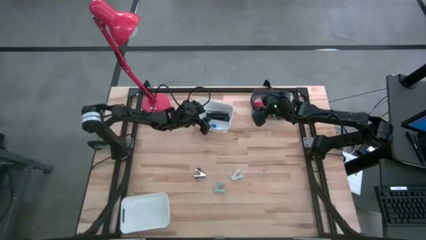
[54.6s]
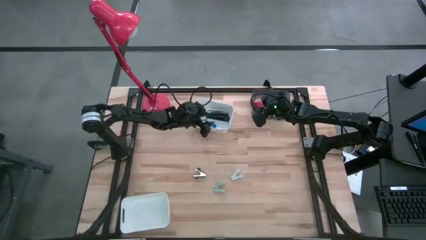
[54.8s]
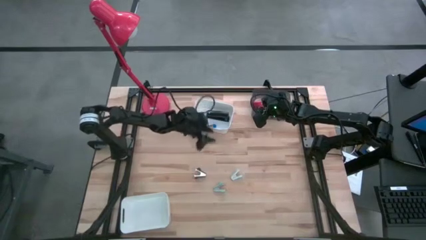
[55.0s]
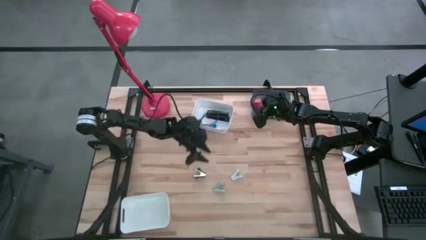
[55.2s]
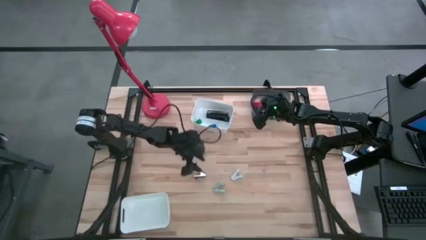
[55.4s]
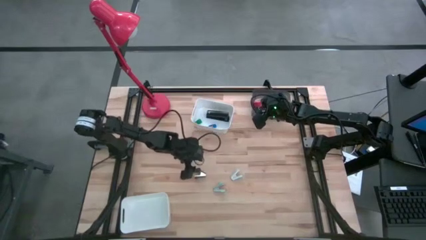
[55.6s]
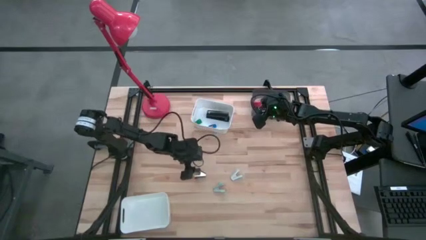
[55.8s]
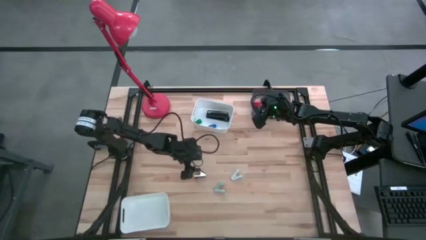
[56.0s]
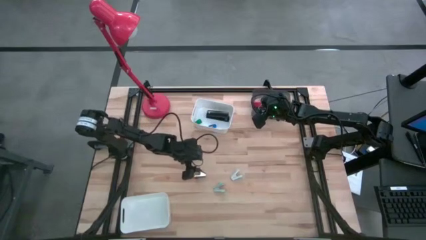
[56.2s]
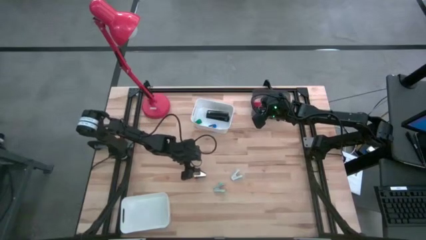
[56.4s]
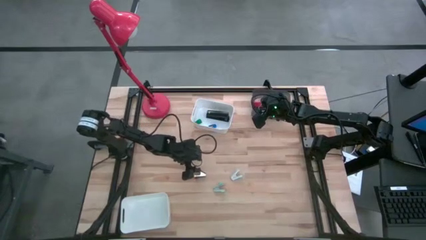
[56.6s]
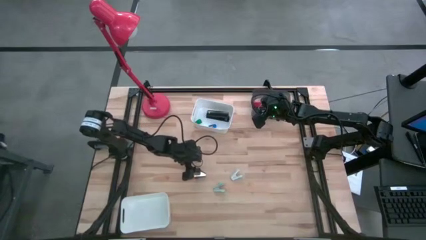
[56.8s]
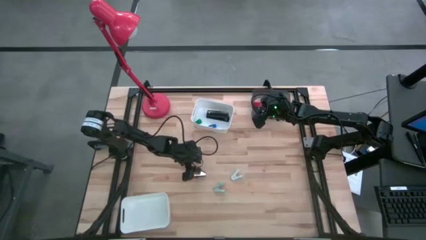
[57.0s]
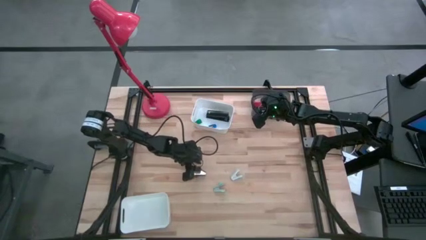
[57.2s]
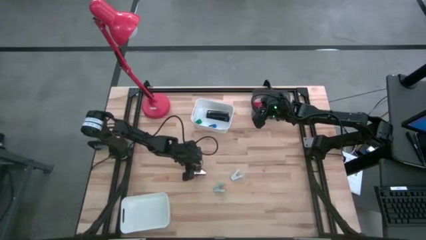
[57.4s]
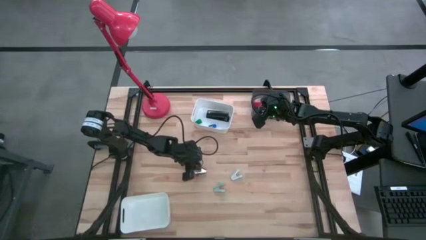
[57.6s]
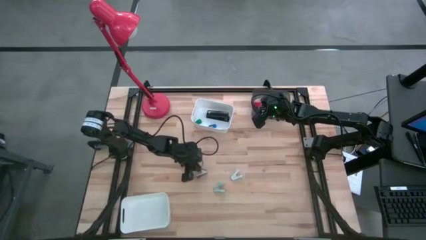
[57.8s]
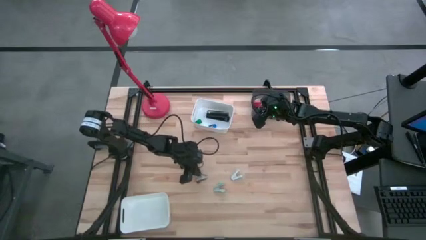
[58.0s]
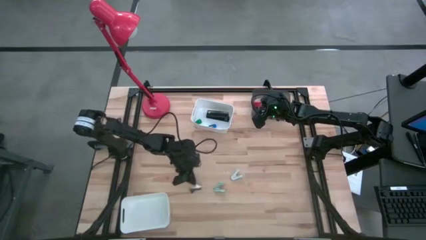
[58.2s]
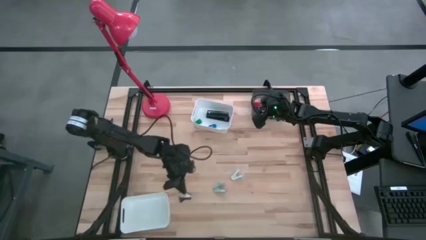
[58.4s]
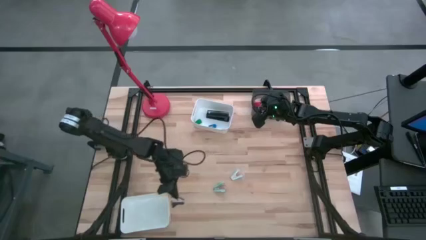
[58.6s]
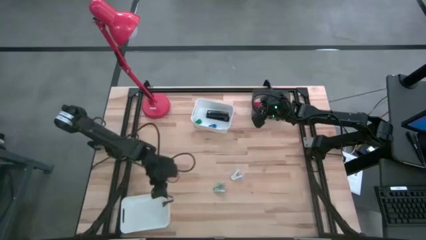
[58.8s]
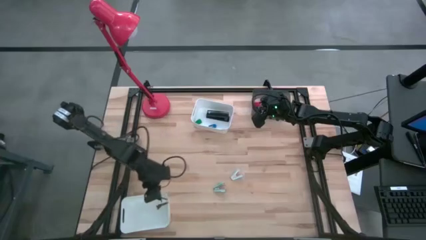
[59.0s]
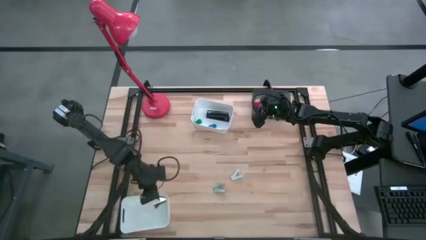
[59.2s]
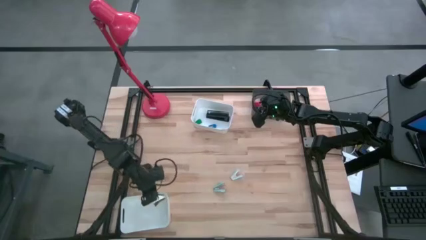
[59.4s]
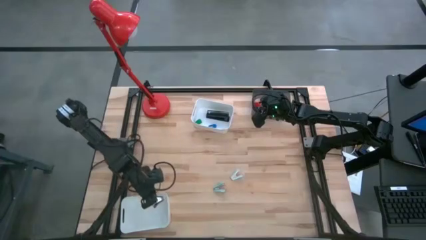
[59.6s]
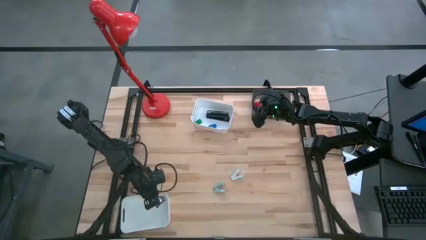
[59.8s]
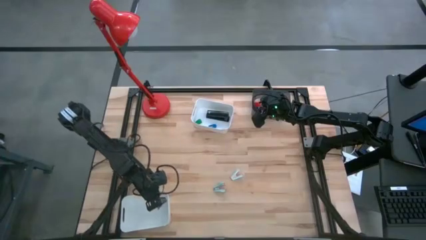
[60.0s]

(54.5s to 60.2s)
Task: Pick and place Stapler, Stapler remover, tape
Put the black staple remover into the bottom white bin

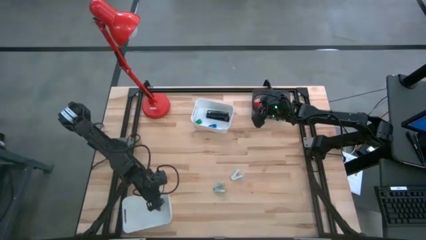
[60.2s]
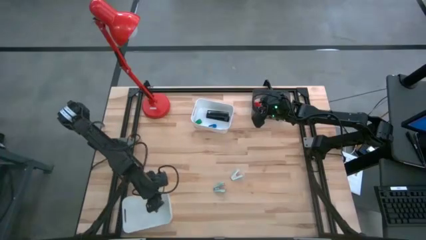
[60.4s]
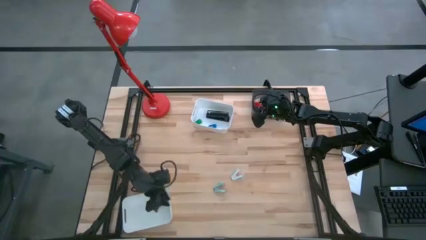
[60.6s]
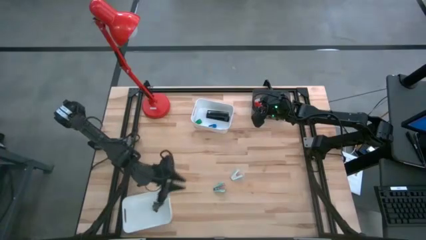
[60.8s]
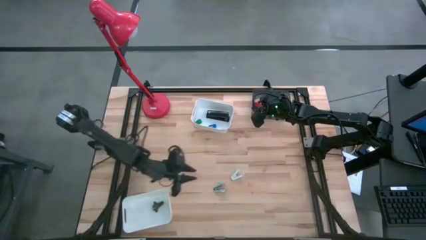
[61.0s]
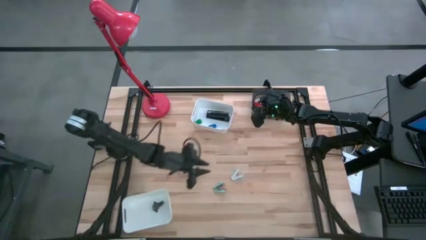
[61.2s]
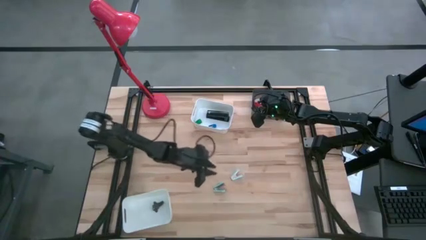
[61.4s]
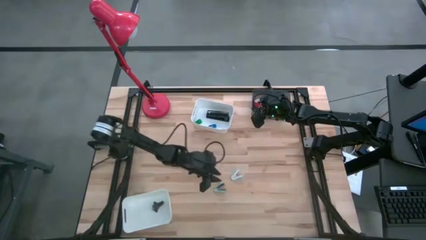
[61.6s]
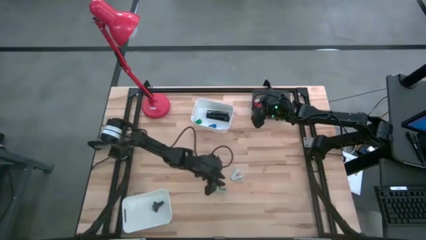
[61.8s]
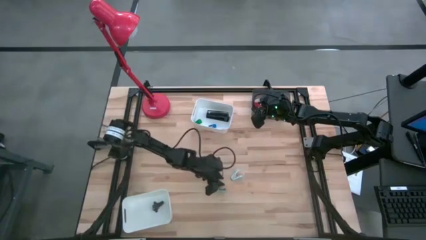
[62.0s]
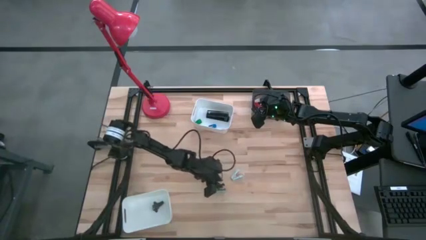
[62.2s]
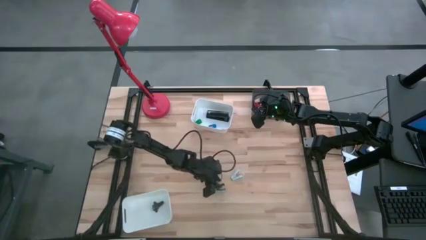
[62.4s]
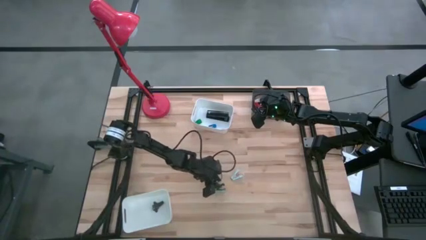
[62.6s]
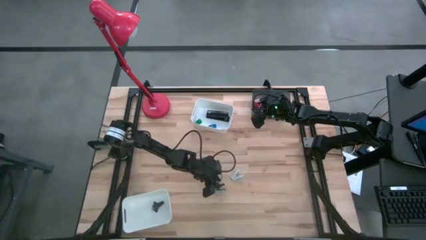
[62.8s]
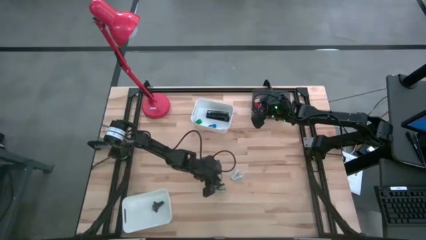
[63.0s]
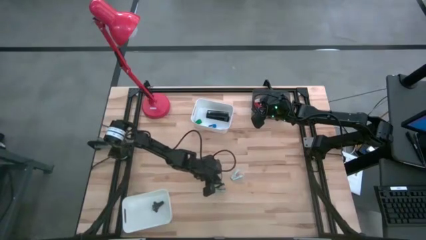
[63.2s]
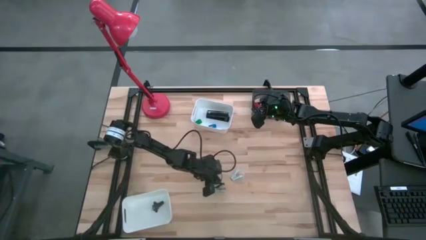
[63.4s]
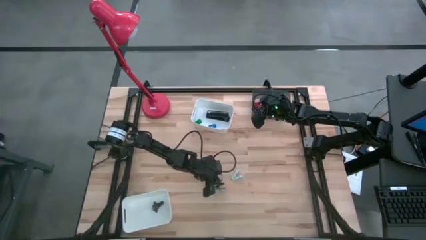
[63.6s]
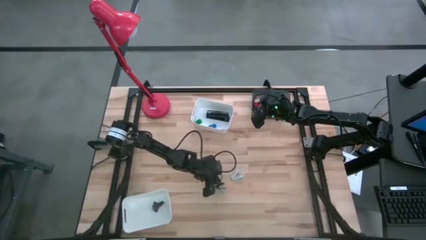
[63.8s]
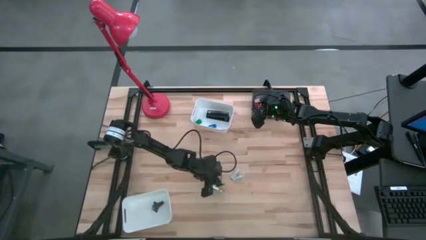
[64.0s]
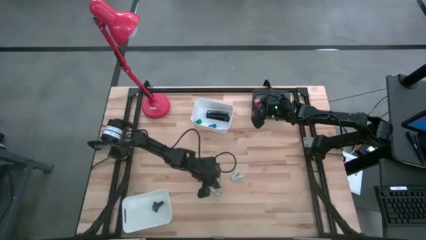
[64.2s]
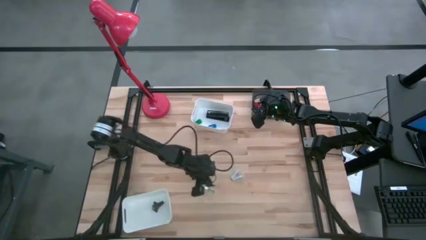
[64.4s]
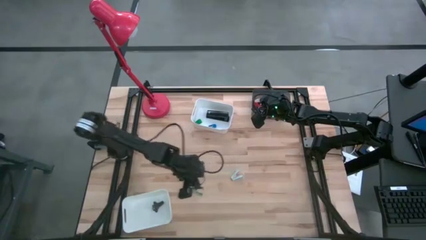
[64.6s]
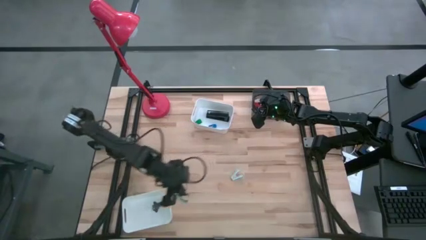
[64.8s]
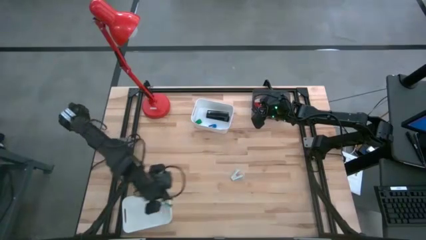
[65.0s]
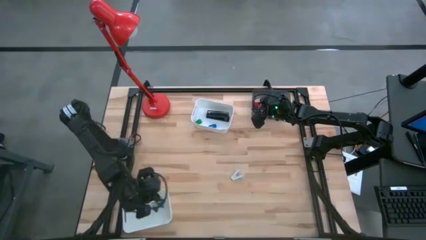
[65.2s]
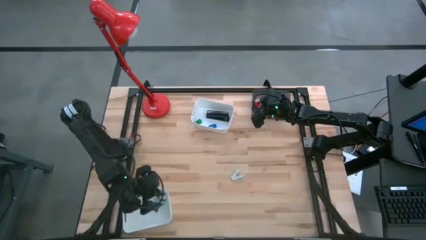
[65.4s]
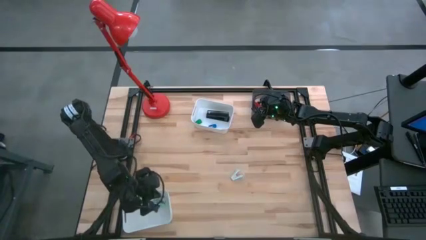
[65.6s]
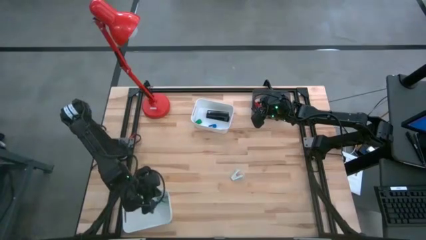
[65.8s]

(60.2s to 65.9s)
Put the left blue staple remover into the bottom white bin

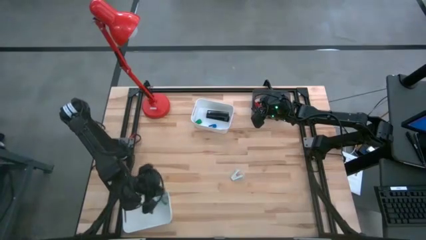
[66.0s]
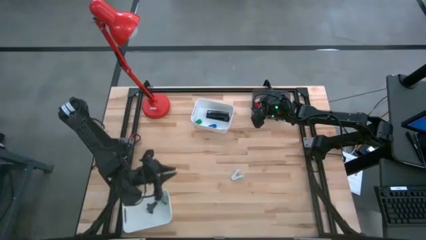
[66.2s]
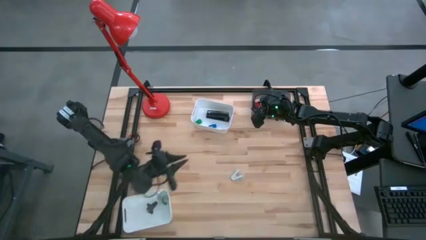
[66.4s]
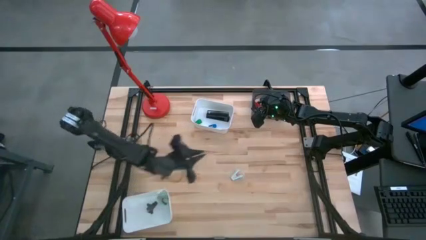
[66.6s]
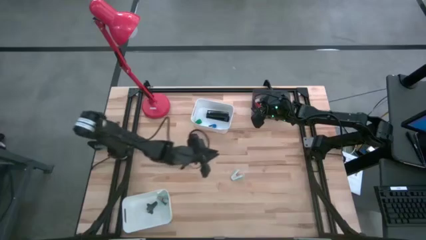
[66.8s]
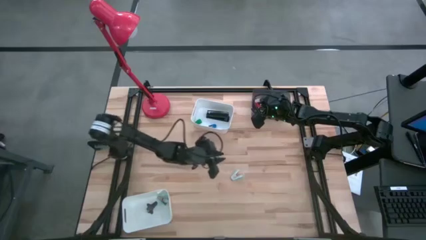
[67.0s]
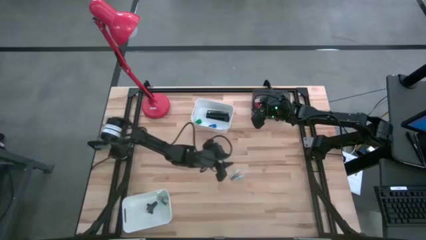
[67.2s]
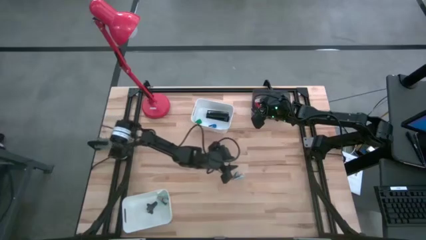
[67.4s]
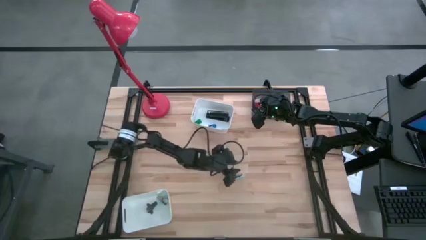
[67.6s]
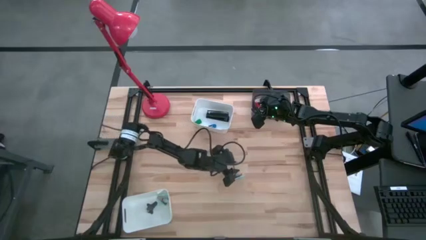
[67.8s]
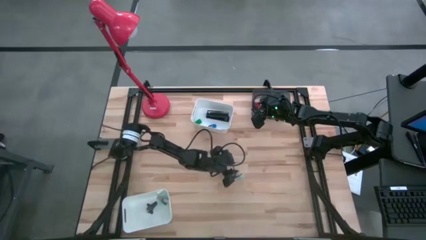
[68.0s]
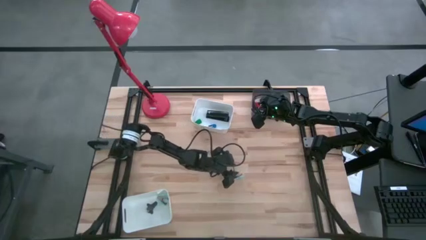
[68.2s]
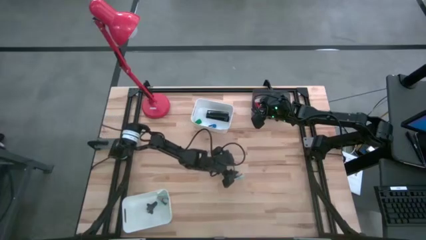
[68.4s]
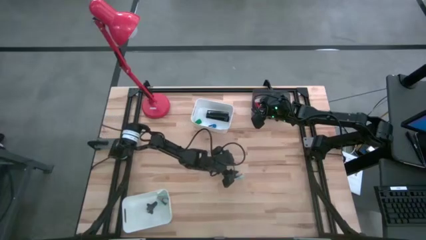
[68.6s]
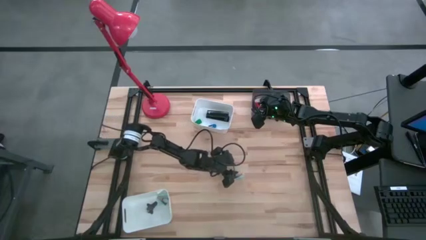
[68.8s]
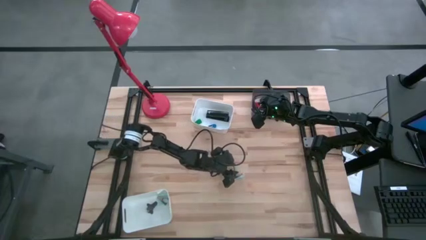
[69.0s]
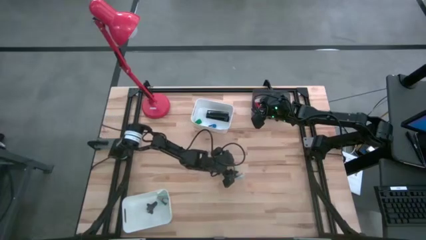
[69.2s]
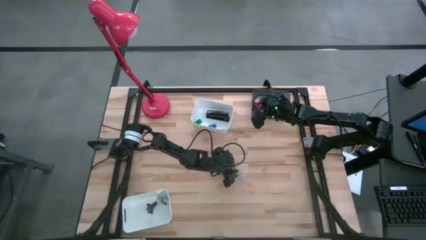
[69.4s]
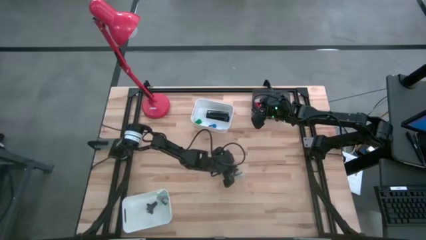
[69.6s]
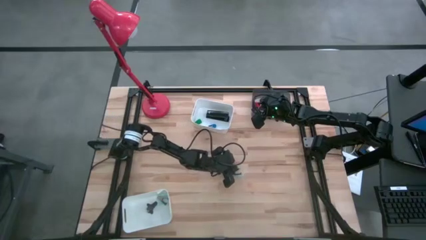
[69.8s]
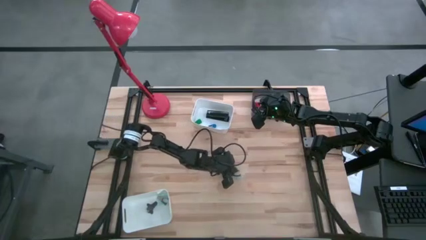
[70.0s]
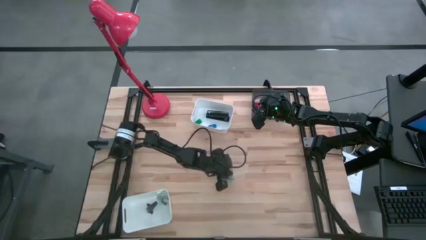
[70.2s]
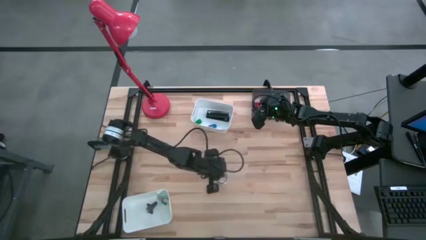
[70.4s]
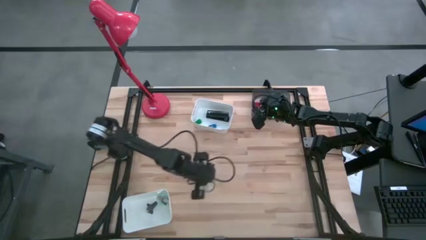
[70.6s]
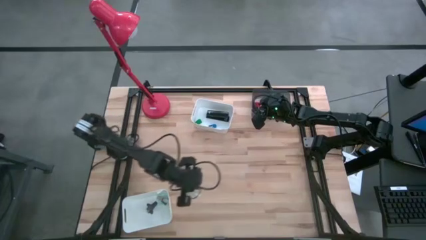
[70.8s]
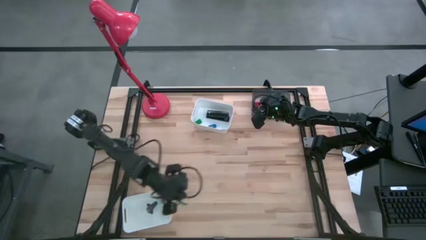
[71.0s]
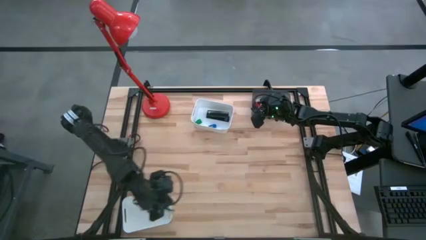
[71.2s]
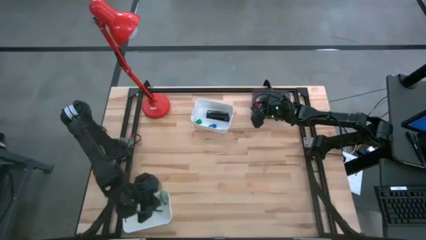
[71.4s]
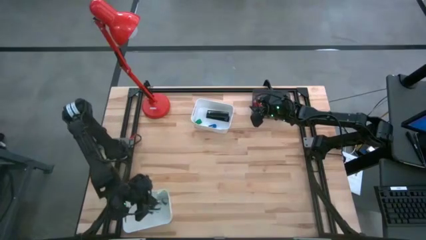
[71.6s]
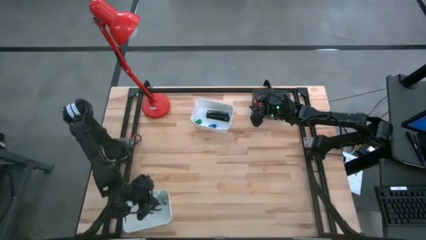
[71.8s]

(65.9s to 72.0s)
Put the blue staple remover into the bottom white bin
